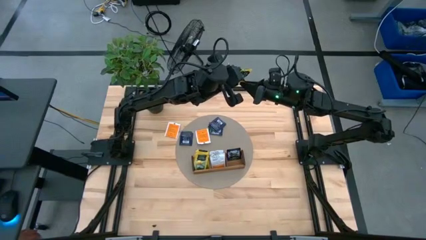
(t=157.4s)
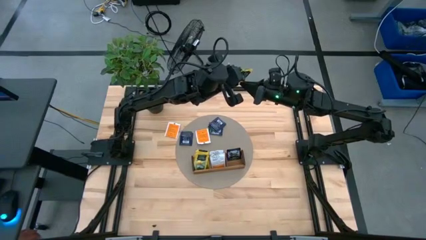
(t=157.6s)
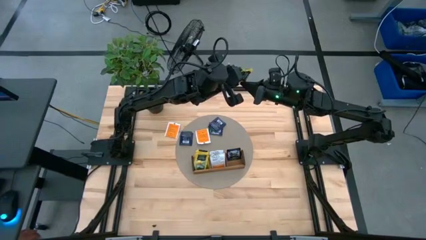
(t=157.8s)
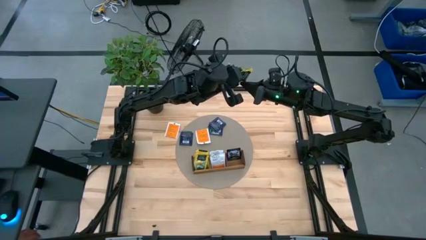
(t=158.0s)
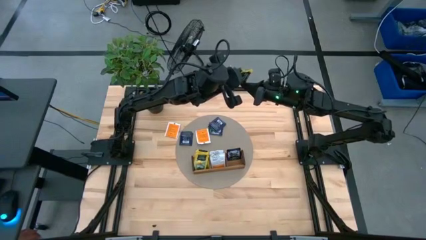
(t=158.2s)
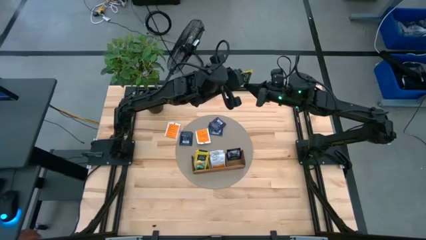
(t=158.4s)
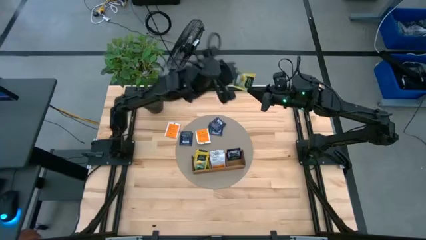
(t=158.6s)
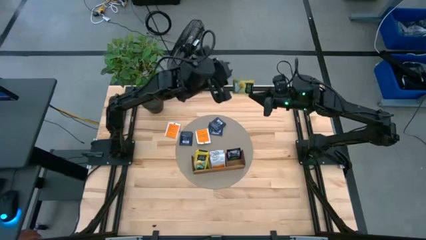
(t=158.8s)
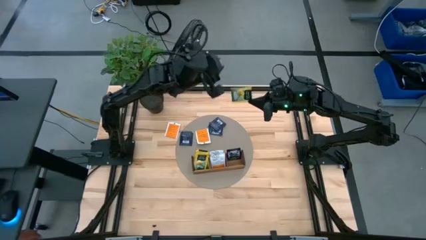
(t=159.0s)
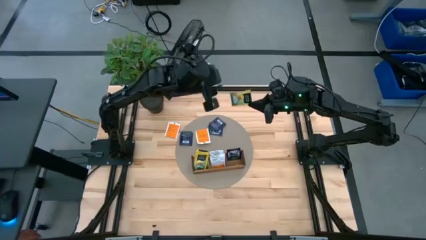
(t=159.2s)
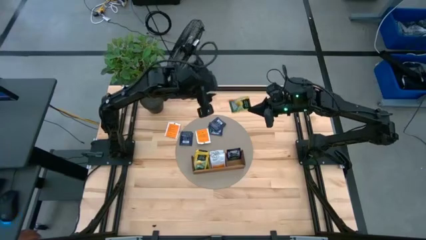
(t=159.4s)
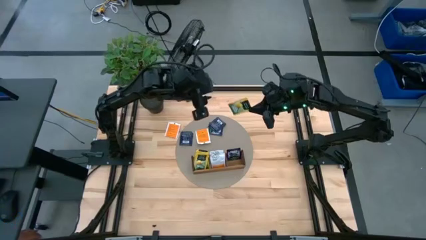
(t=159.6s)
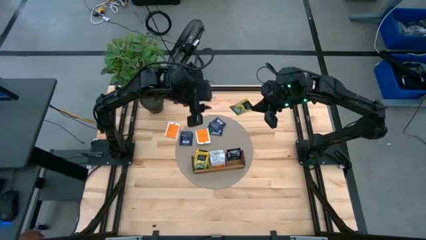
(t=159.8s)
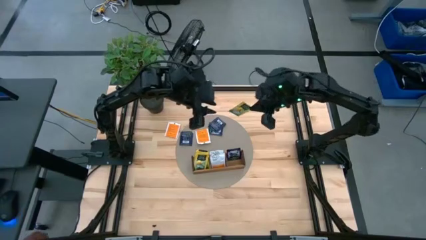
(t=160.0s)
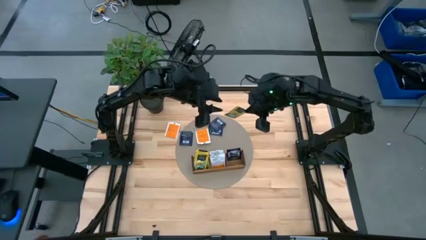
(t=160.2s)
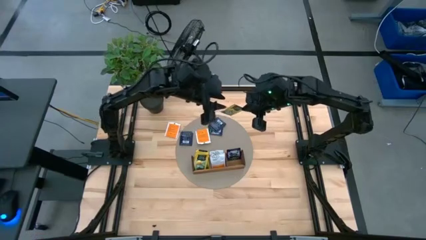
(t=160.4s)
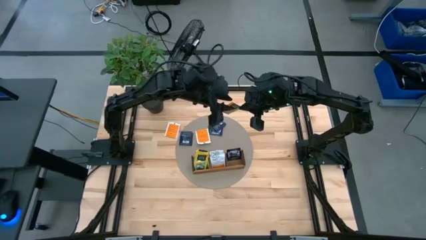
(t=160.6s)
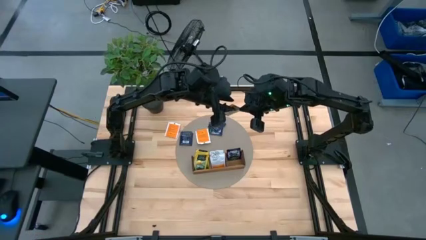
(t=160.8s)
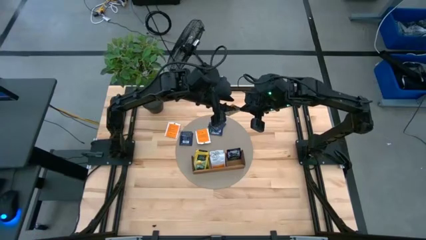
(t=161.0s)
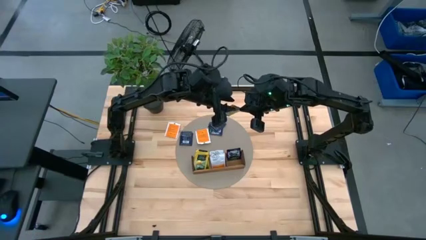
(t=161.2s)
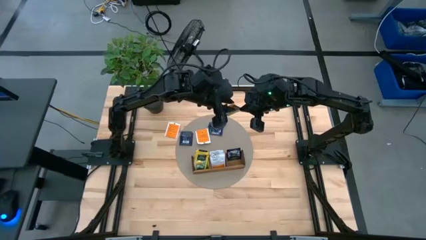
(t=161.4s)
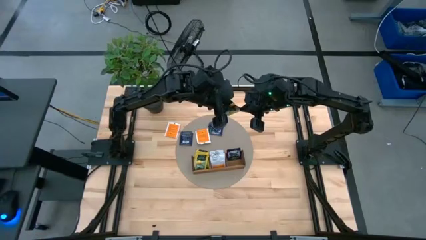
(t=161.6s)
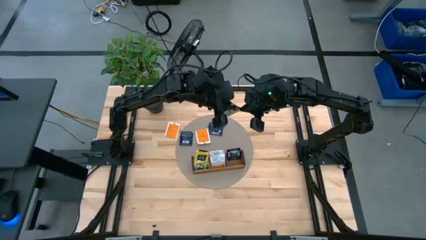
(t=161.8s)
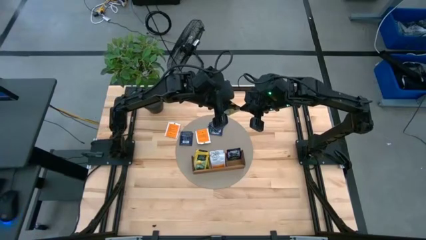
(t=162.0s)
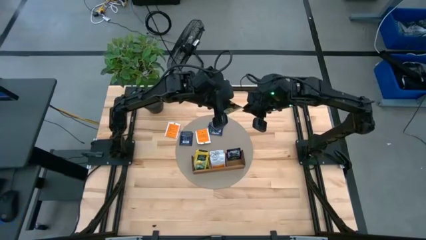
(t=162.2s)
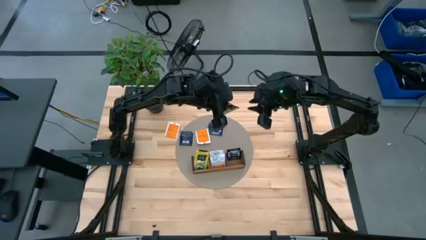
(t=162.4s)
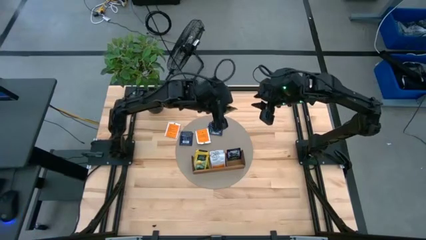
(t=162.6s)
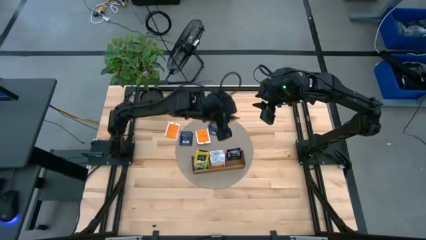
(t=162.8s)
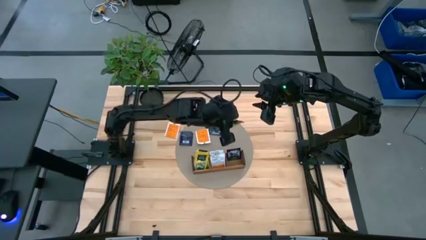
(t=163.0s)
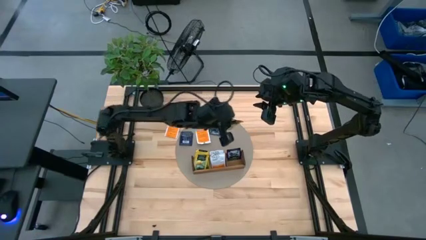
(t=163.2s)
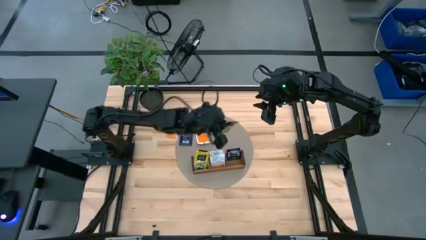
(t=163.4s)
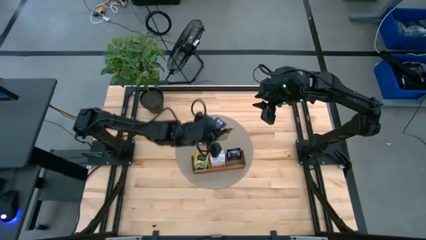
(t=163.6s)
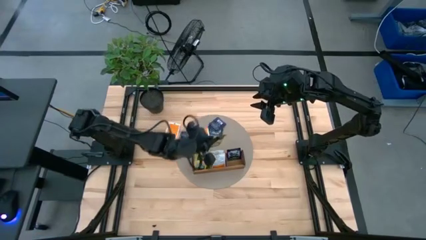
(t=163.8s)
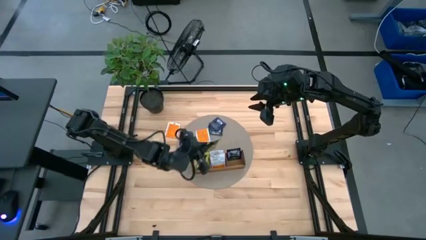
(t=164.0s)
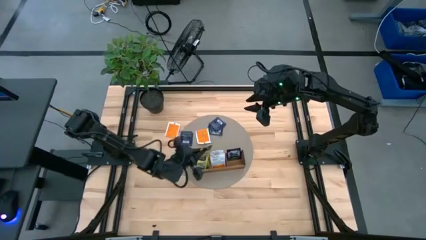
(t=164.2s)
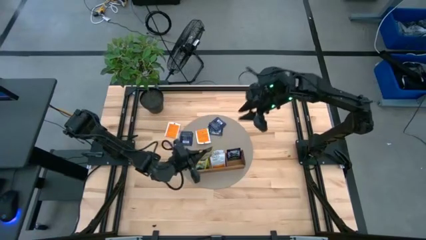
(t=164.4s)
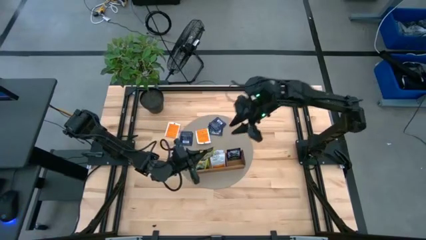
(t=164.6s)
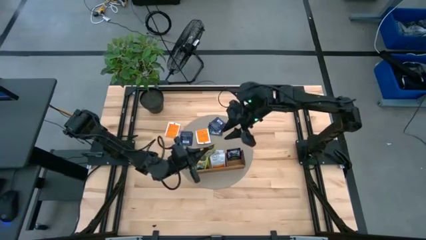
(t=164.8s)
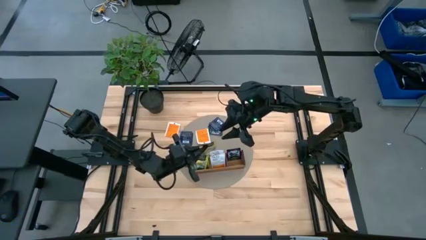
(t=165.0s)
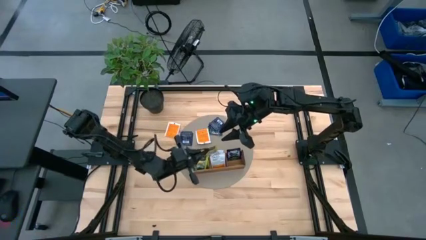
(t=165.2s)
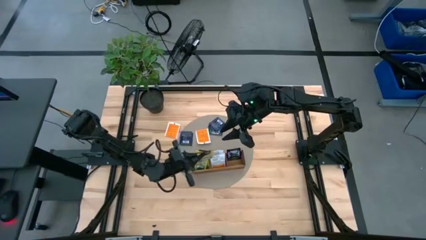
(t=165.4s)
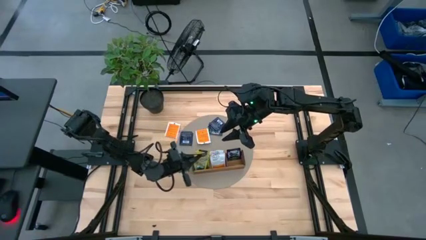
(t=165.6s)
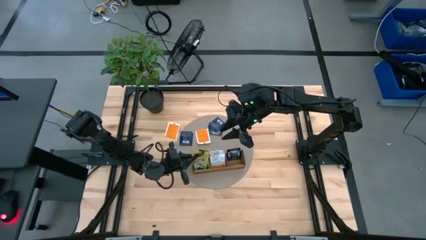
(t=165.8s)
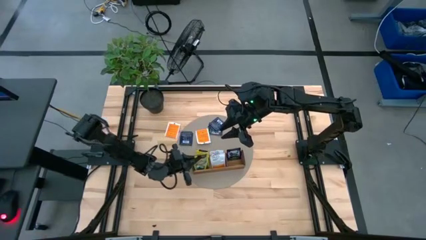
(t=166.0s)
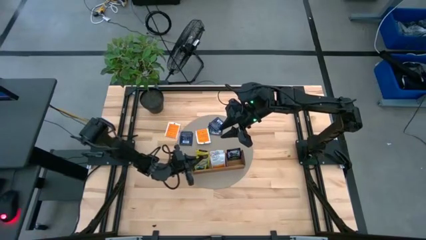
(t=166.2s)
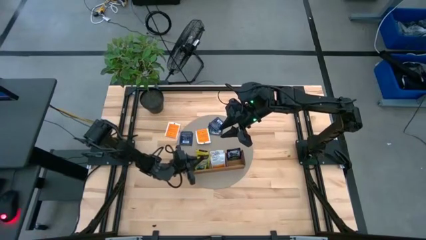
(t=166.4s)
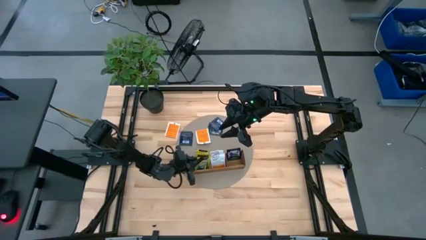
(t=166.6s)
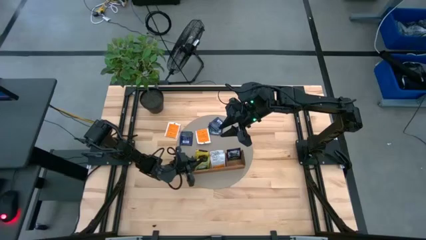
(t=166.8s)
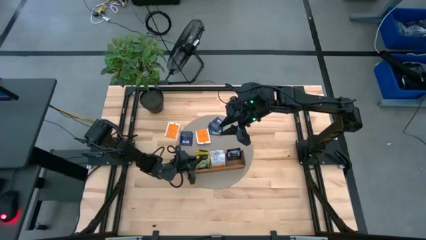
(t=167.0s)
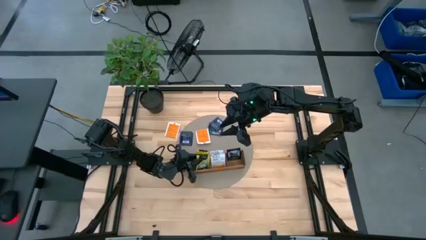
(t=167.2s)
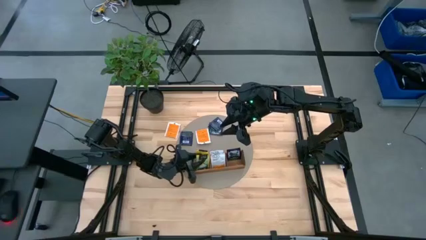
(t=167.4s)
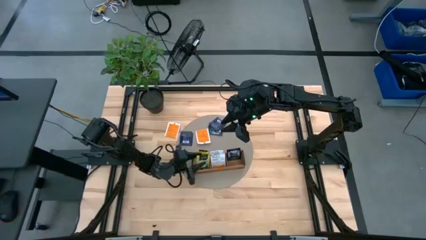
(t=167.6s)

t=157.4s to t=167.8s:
Task: Pick & Place Tea
Put the yellow tea bag into the left section of the wooden organizer

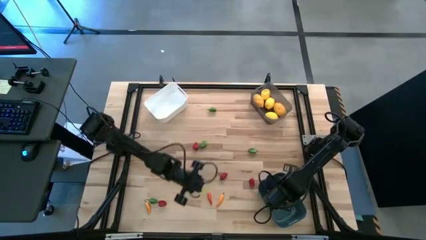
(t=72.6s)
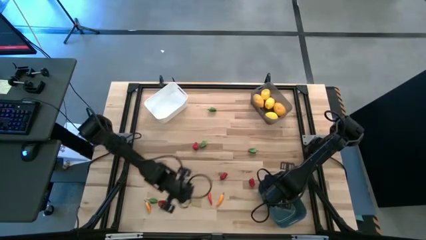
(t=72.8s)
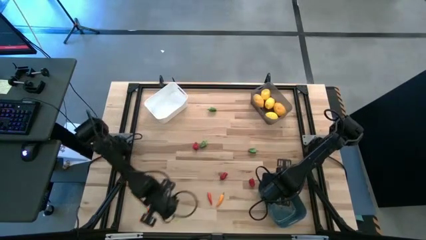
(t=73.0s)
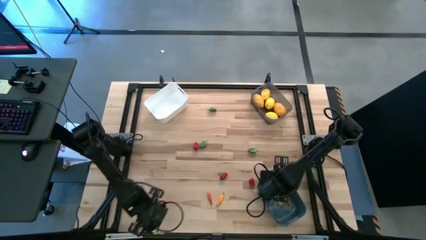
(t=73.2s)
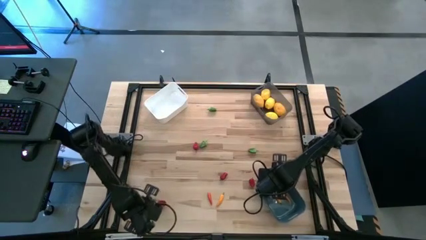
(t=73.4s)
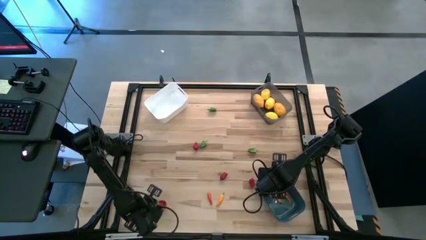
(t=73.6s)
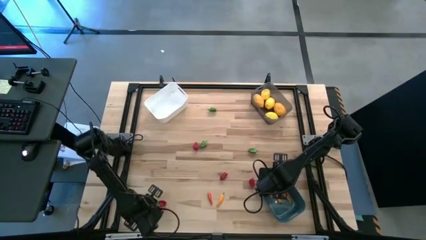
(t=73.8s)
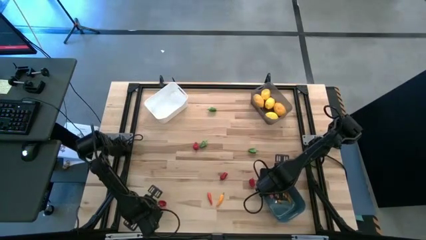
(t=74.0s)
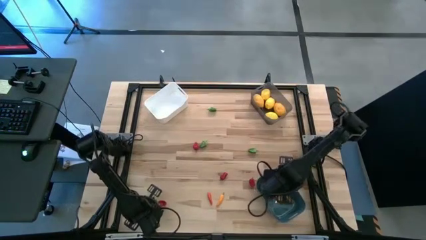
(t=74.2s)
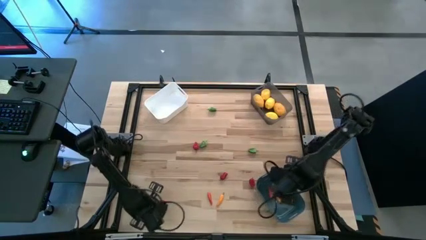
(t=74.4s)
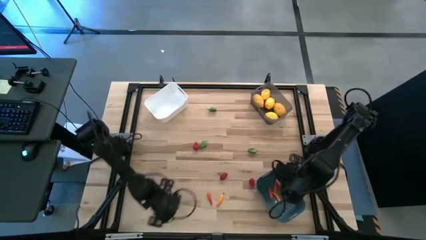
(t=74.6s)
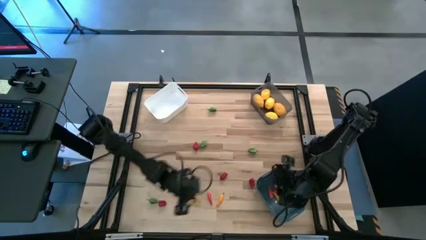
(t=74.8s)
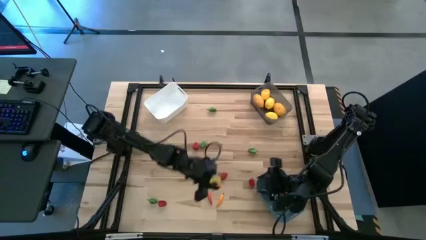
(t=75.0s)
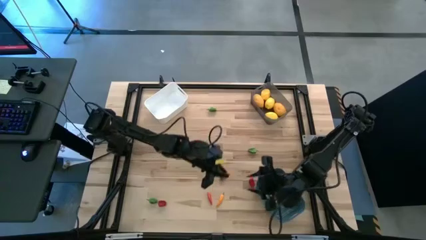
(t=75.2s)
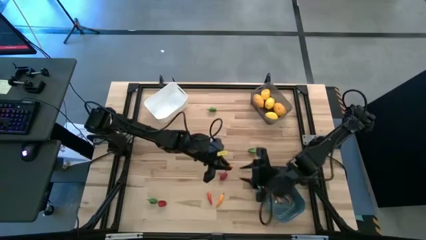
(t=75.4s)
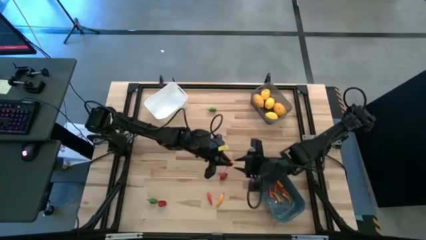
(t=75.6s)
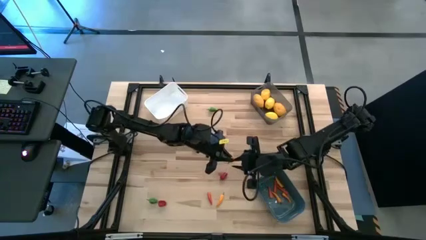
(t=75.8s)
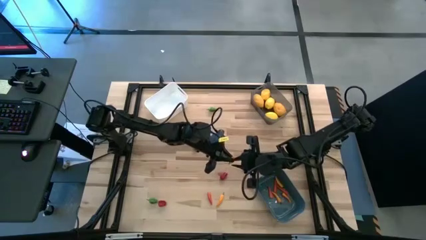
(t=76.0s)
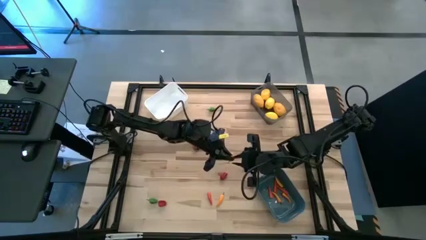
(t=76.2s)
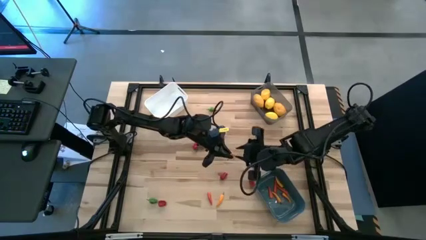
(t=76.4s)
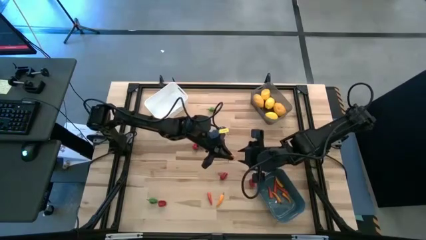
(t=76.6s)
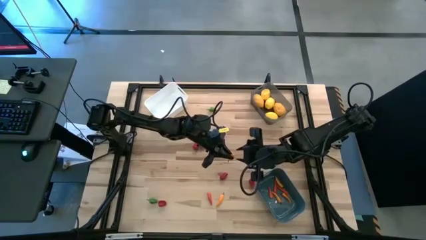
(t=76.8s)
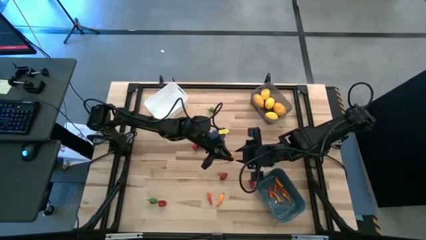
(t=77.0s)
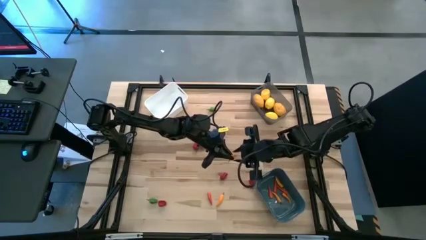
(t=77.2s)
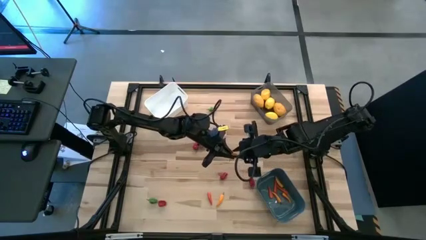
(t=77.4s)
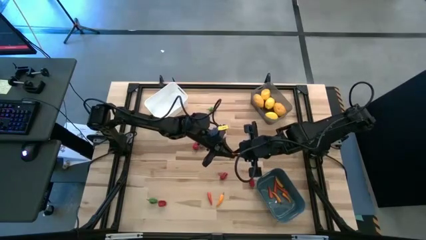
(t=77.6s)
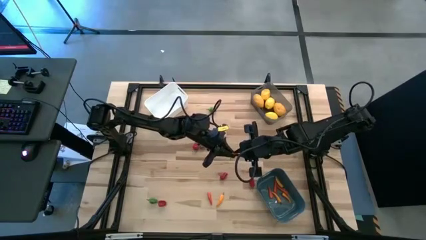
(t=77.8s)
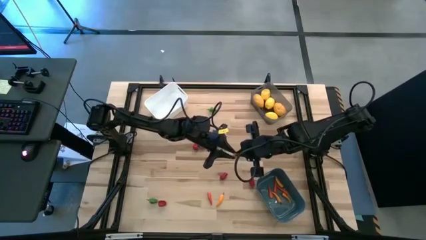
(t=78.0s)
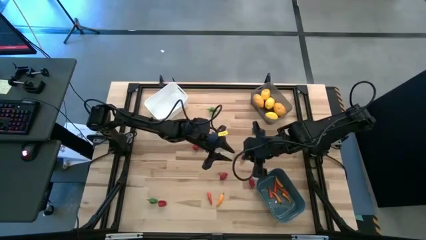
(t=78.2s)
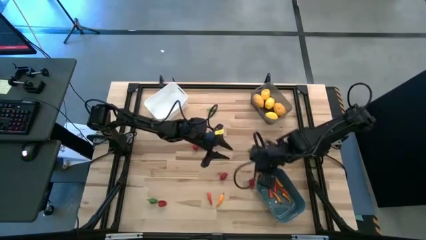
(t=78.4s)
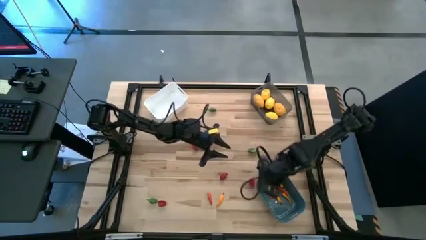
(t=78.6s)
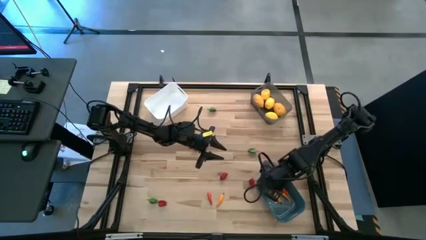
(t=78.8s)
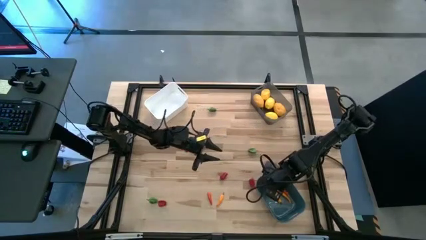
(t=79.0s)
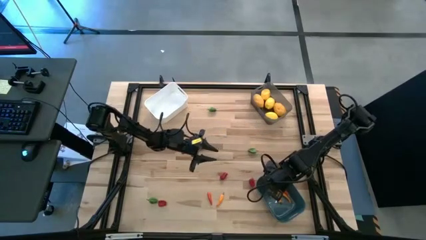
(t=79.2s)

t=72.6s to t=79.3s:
Task: Sort produce into baskets
Put the yellow chili pepper into the blue bin
